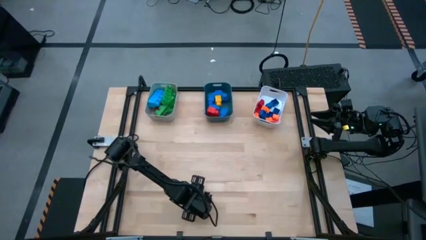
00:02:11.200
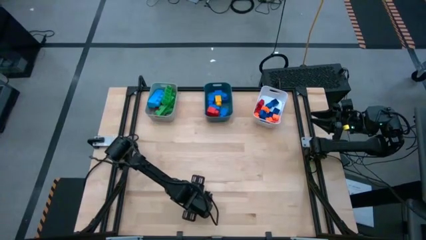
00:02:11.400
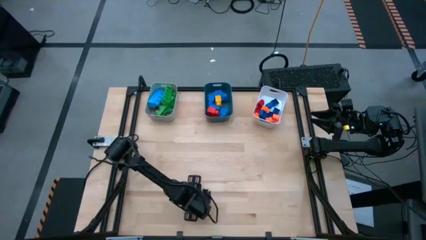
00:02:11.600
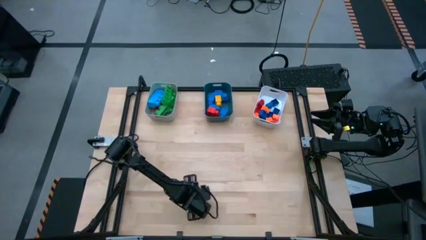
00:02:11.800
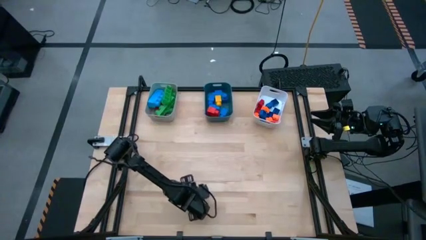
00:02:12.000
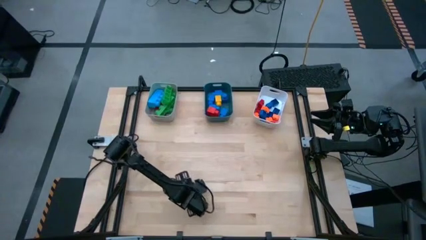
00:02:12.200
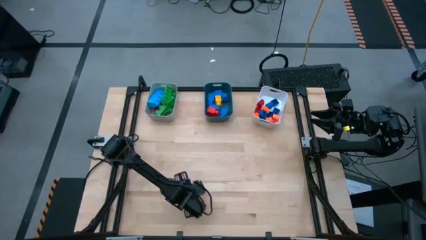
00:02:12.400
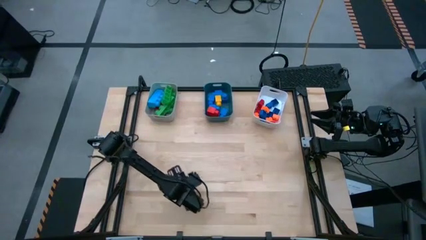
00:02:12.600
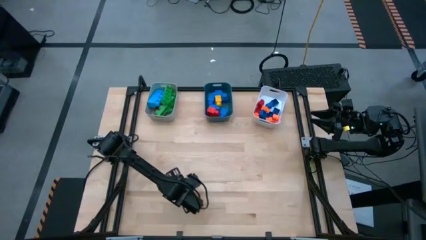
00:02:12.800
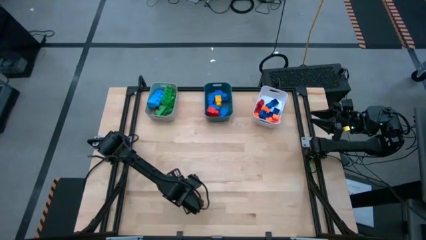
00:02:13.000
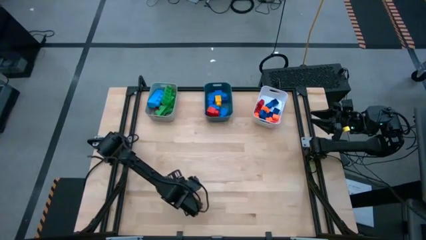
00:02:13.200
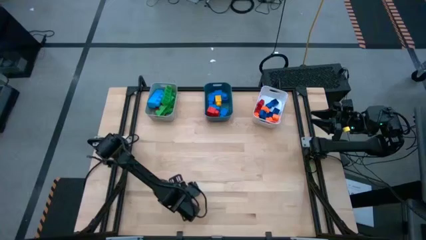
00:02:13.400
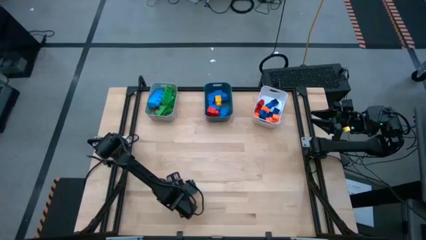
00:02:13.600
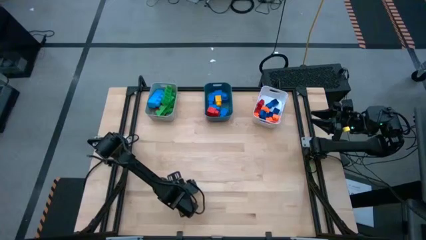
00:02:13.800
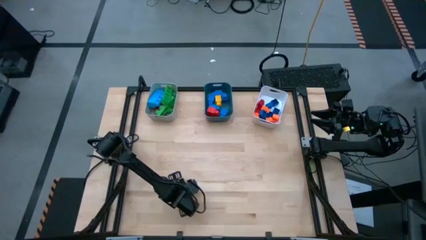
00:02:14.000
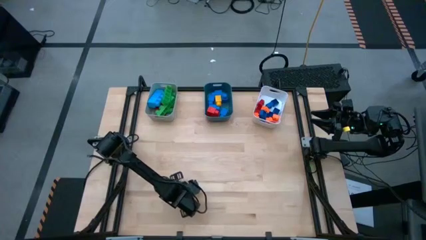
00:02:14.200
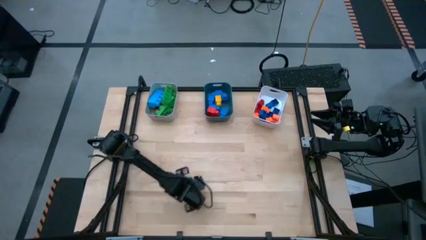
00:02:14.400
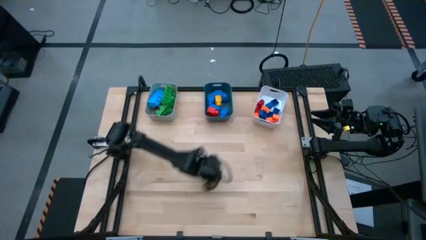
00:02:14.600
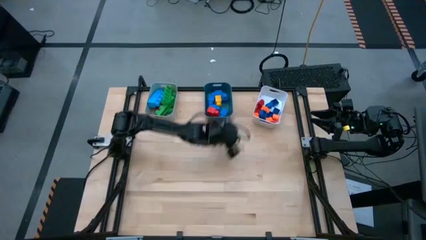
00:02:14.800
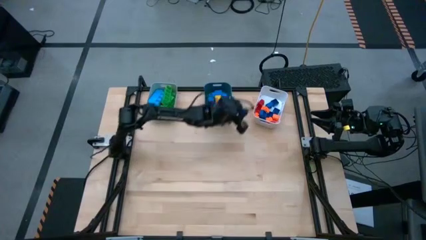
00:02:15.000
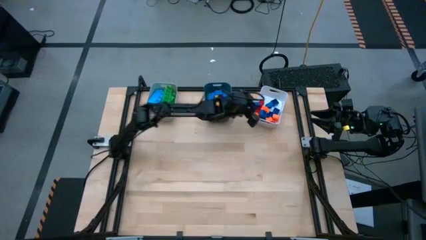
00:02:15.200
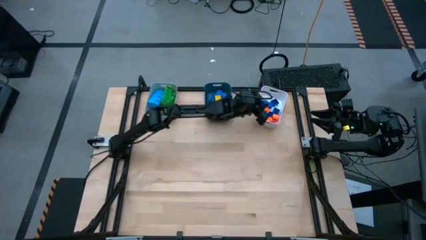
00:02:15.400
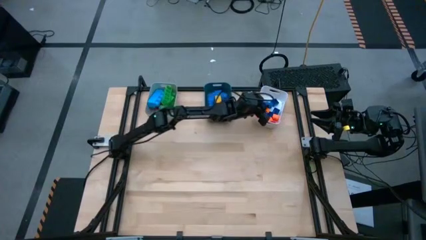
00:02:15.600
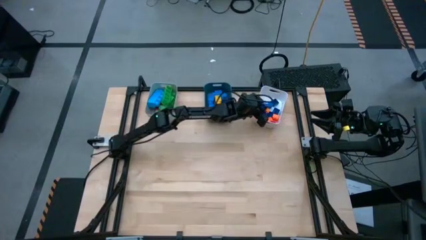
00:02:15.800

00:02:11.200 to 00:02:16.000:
Task: Sort blocks by size
Put the small blue 4 stud game piece into the white bin

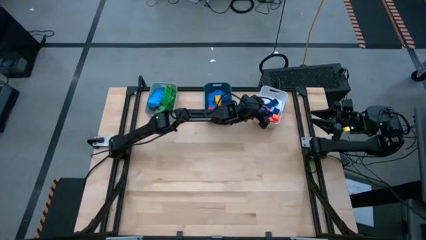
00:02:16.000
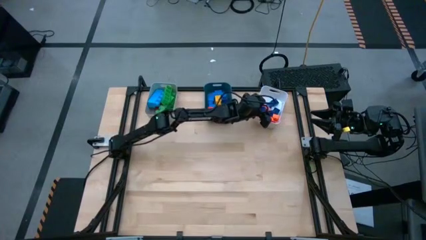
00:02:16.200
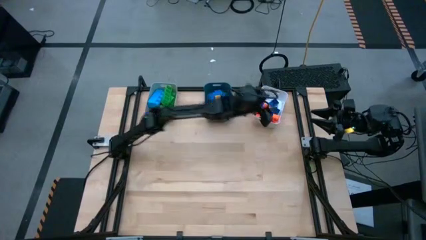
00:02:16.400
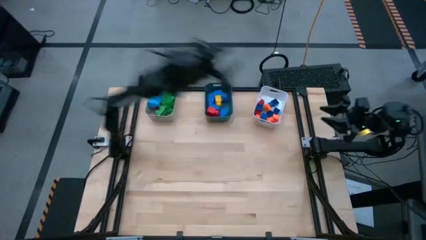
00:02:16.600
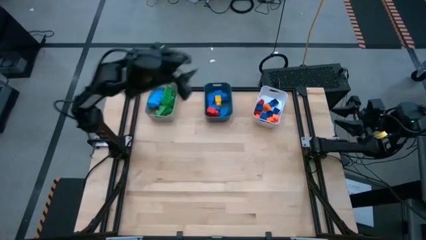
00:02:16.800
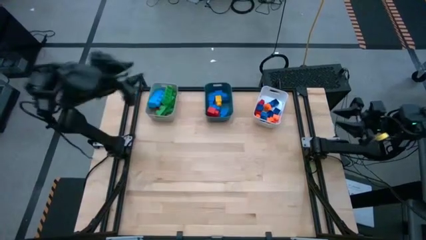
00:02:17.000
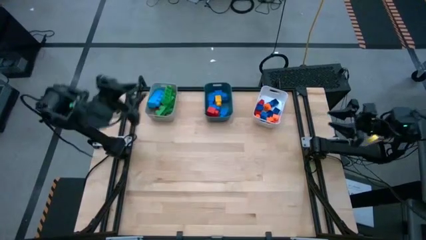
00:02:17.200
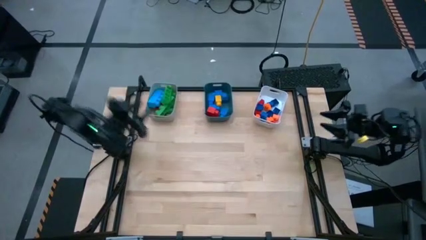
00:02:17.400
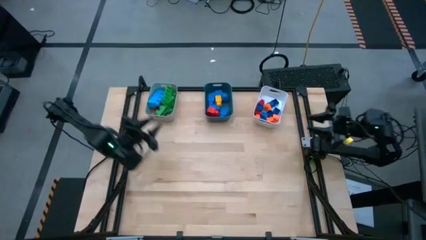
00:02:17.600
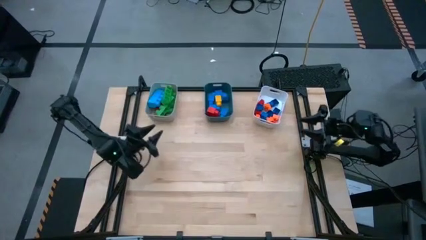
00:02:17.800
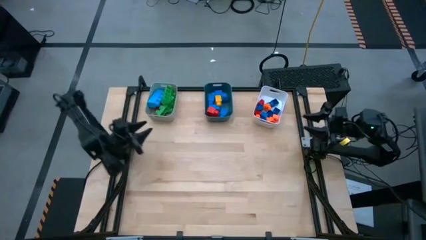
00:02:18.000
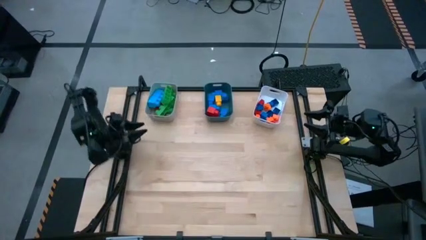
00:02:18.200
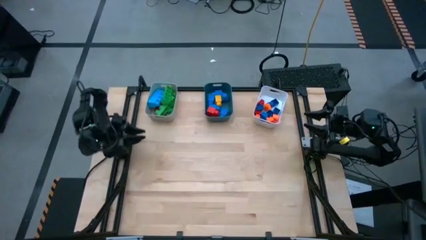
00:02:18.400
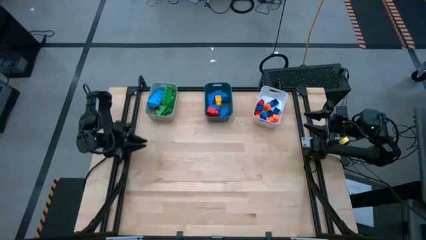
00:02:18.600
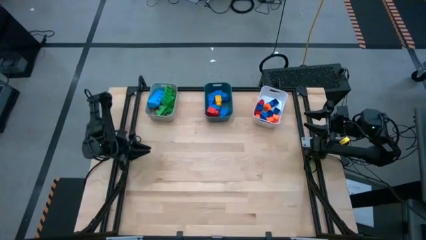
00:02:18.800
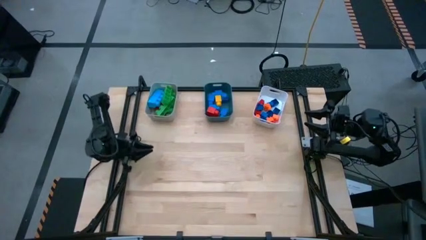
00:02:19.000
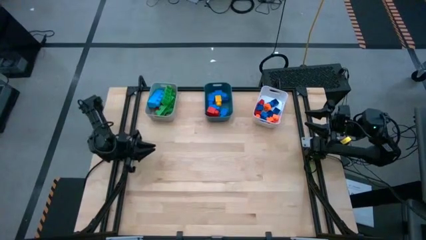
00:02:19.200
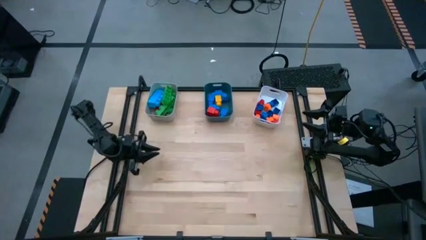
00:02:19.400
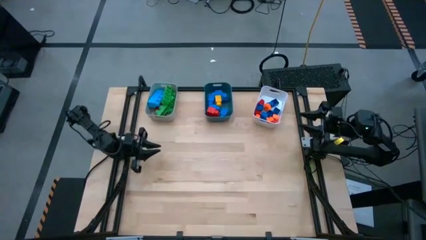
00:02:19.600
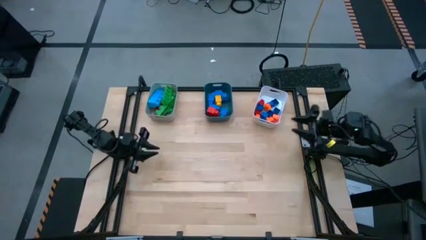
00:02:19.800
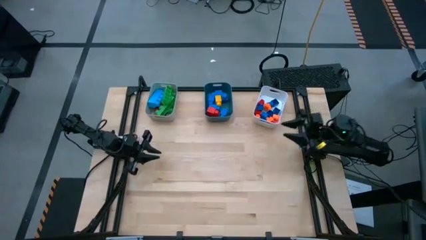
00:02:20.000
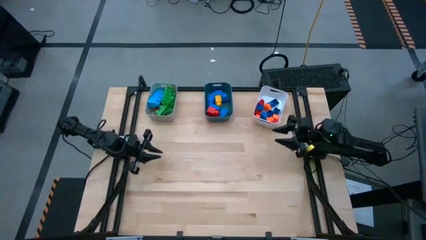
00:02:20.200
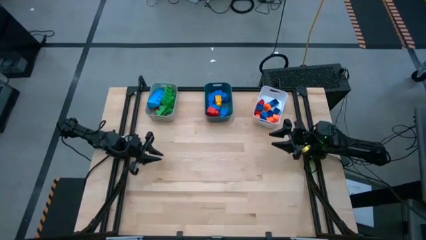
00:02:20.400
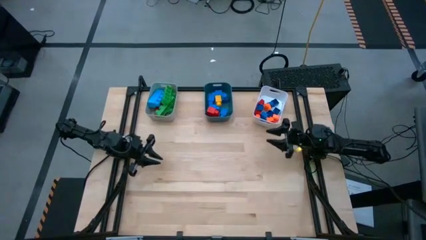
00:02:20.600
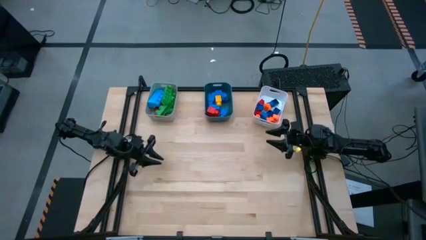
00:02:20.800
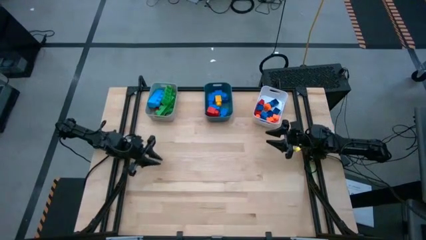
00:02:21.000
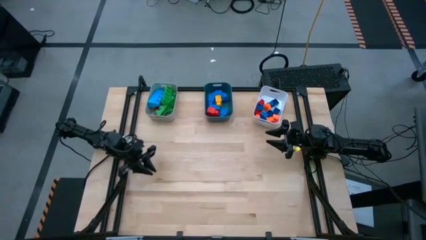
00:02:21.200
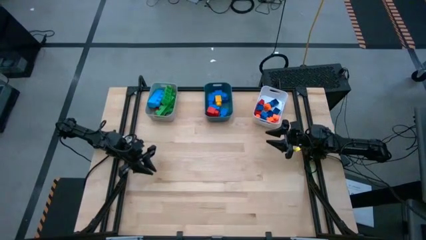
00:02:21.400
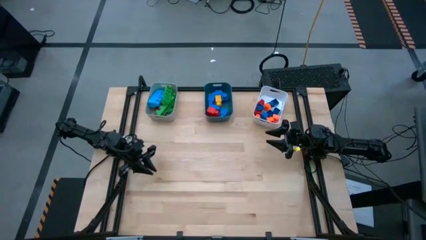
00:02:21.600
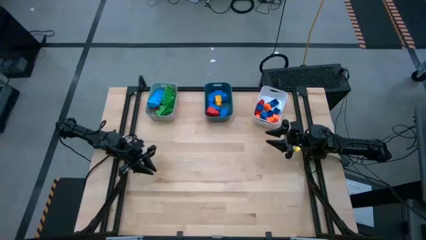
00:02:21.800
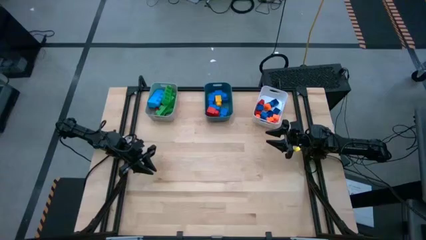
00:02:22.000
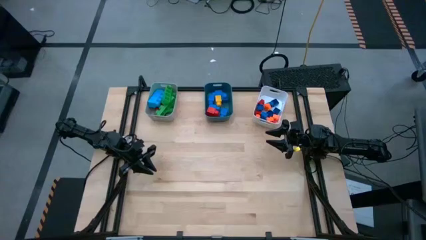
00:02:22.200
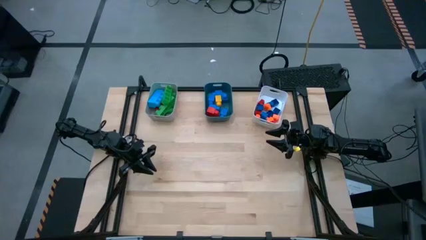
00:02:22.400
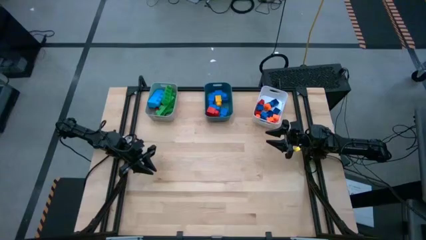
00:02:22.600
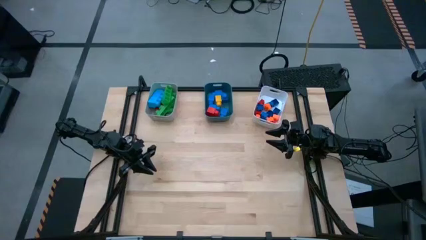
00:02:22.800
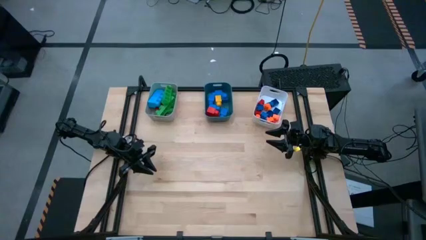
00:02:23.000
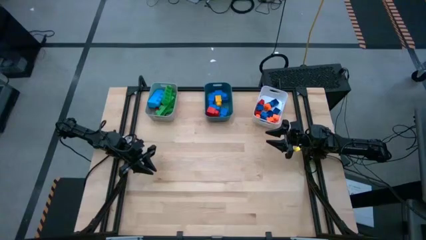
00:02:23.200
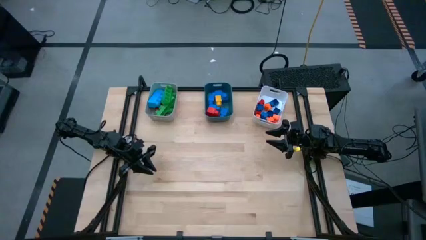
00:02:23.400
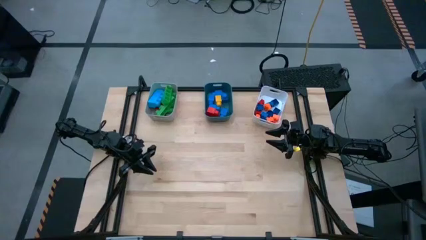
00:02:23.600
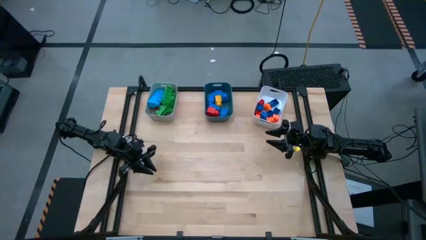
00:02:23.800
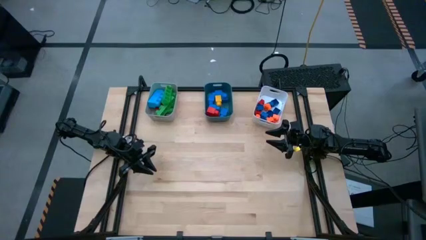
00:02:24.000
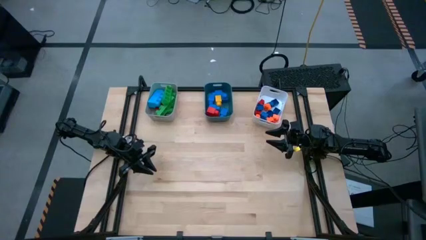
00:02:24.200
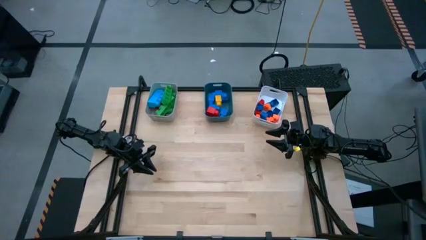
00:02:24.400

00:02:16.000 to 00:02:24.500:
Return to Home Position

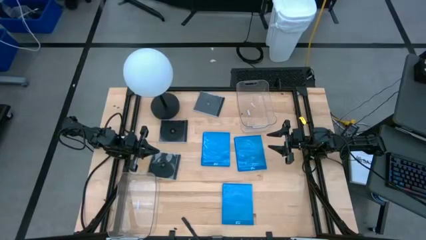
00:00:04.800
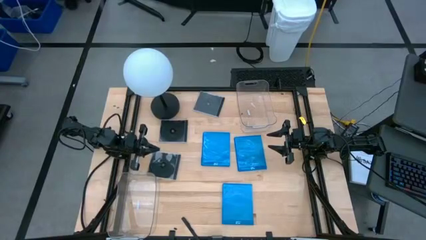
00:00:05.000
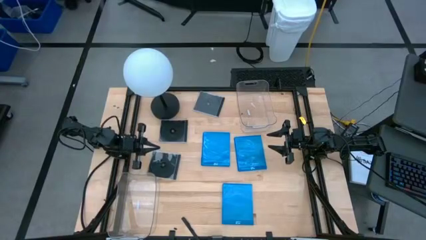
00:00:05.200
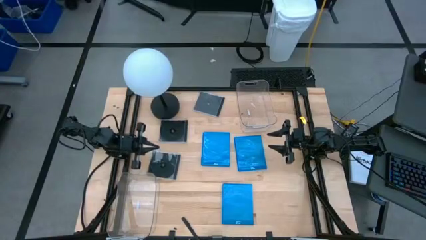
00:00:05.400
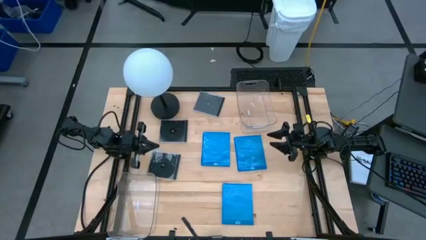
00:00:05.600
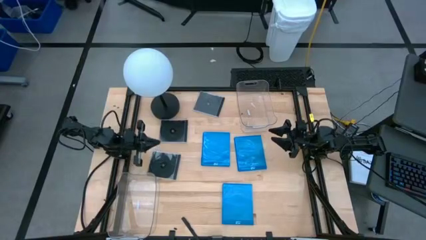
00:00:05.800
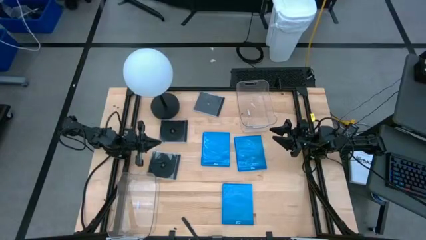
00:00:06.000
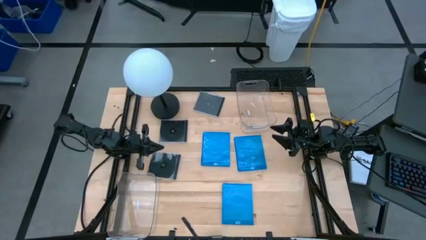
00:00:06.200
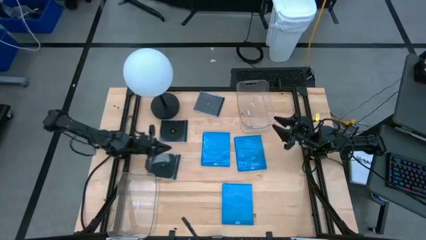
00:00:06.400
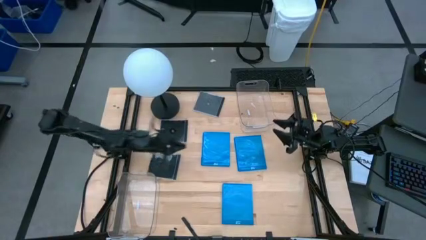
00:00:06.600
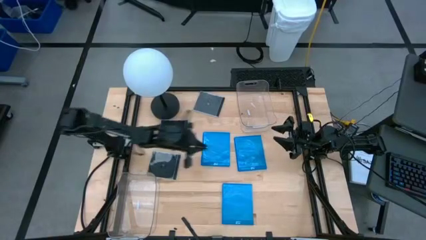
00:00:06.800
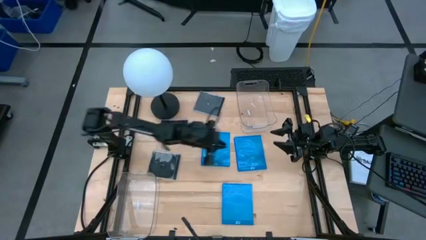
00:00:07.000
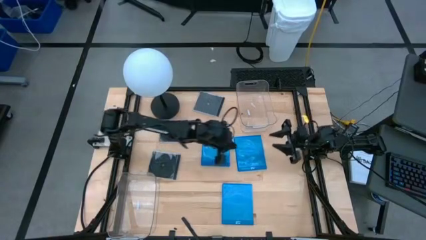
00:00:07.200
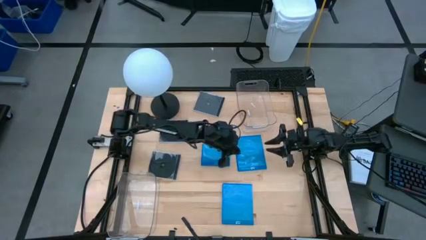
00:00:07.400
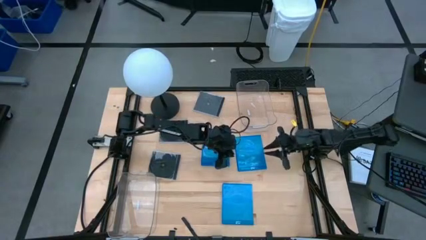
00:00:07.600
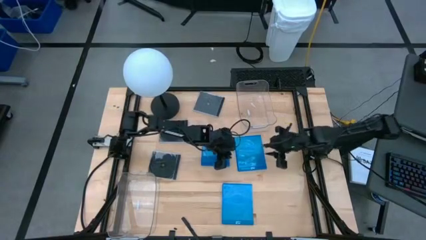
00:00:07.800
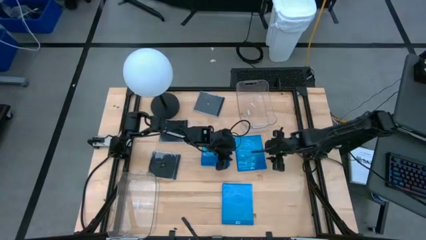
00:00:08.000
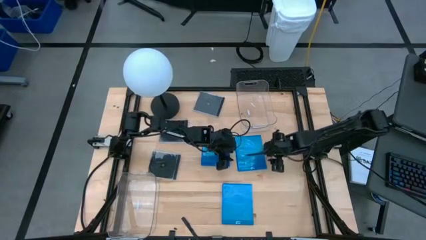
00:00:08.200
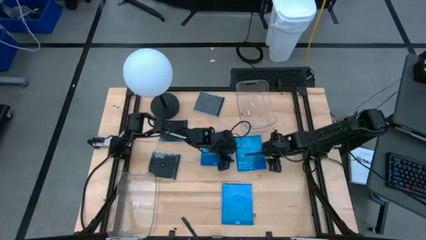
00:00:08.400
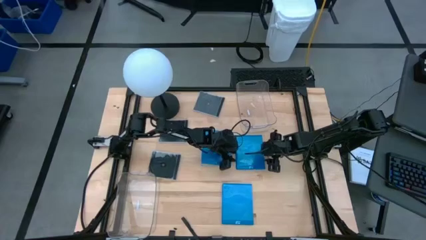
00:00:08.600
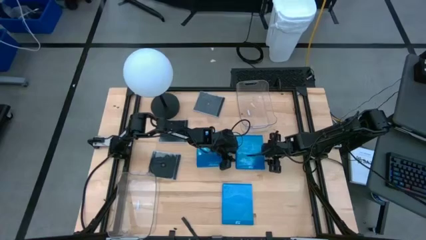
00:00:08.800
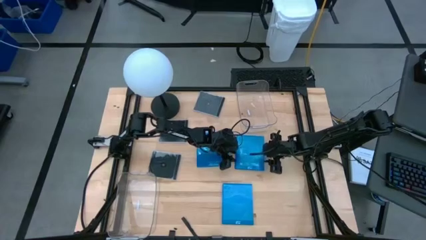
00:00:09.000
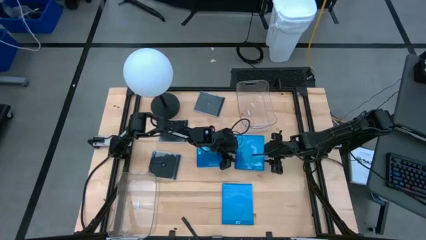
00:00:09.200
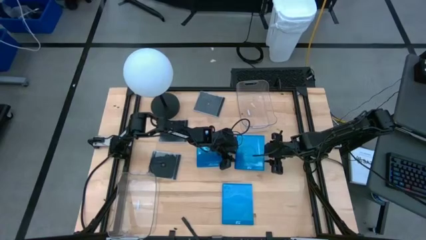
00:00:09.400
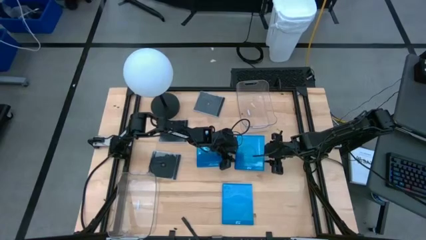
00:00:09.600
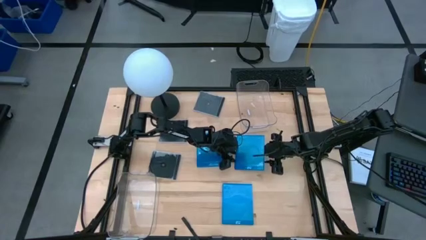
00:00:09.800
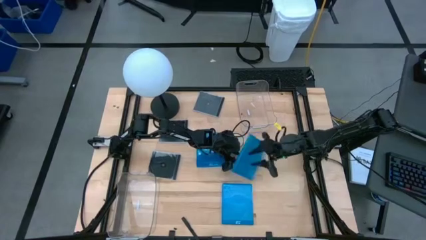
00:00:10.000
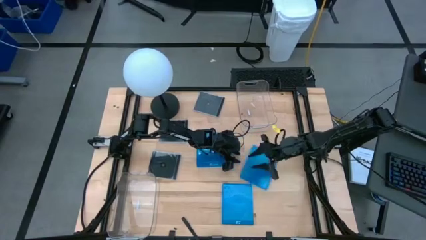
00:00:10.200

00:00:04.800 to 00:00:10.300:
Task: Pick & place jewel cases by type
Put the top right blue CD case into the top transparent bin
